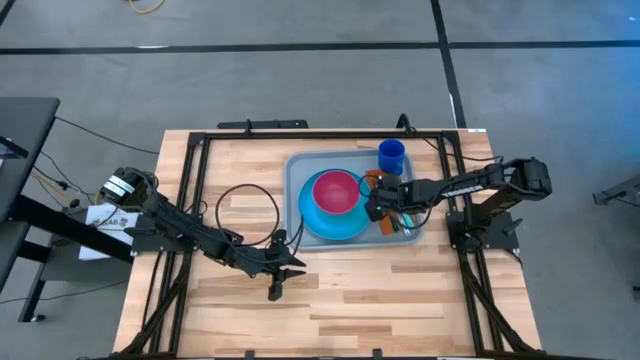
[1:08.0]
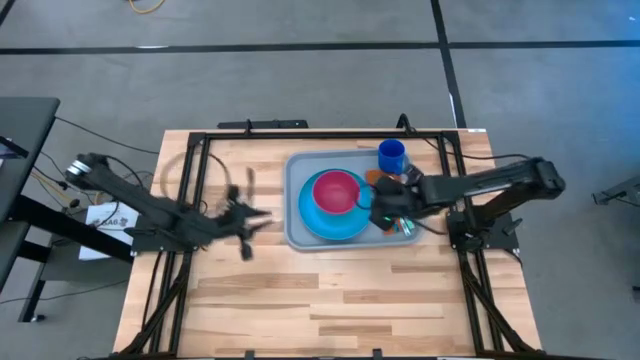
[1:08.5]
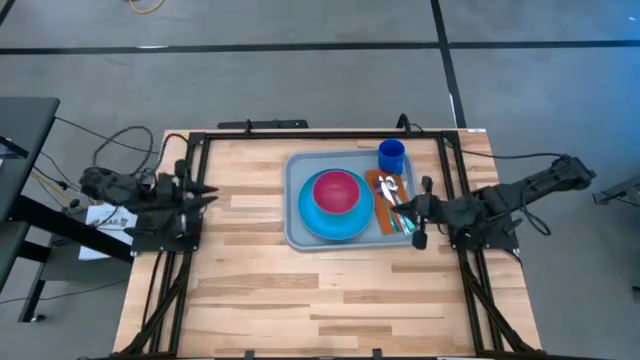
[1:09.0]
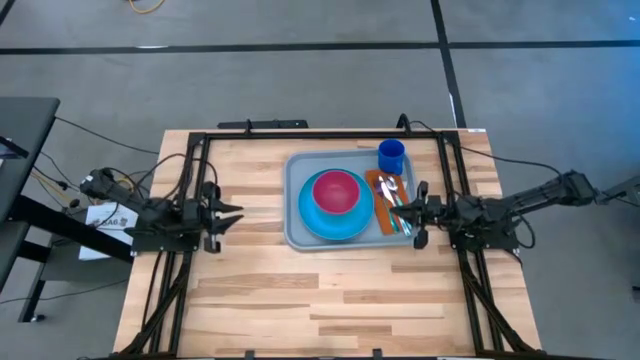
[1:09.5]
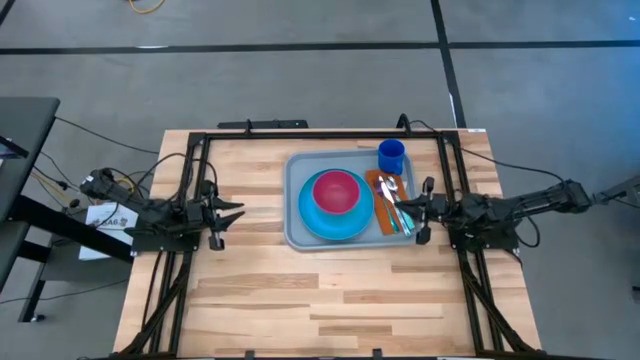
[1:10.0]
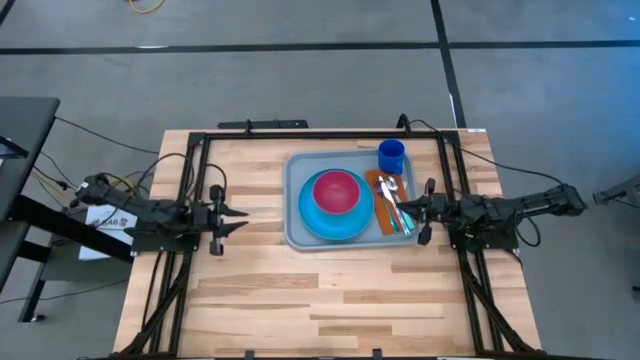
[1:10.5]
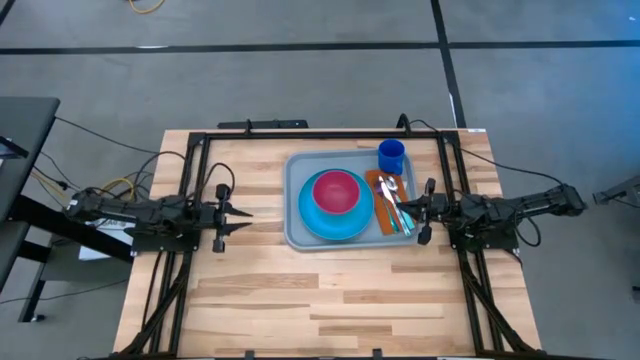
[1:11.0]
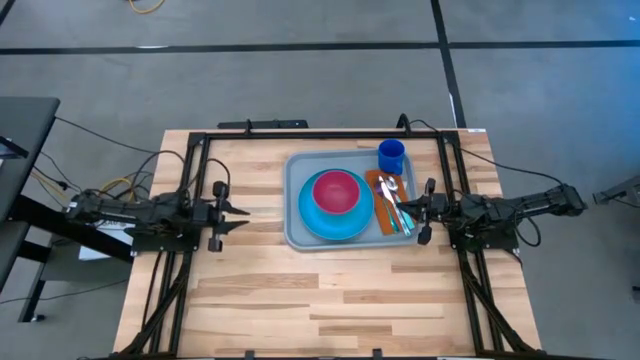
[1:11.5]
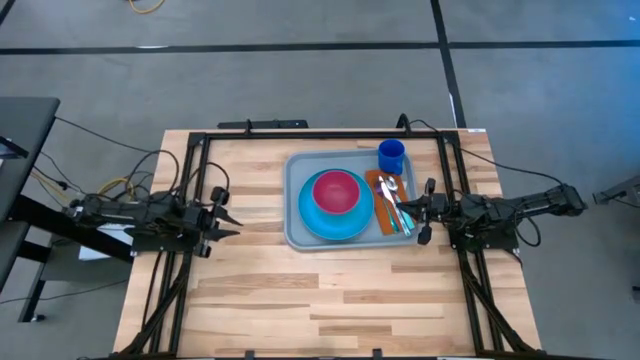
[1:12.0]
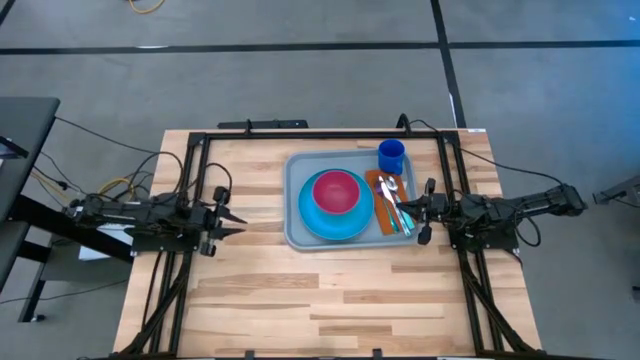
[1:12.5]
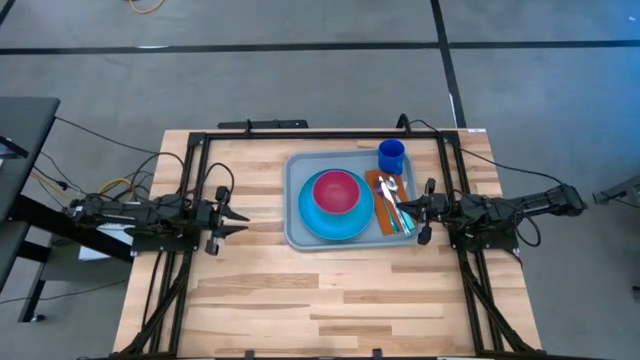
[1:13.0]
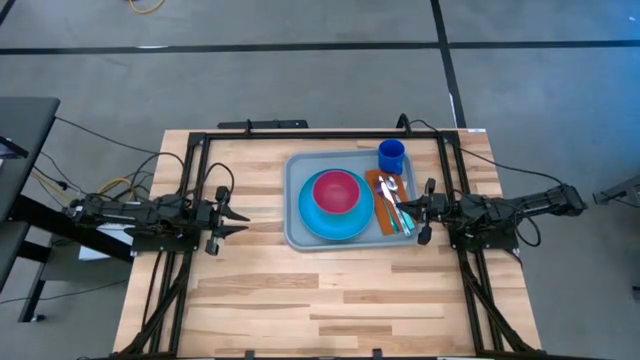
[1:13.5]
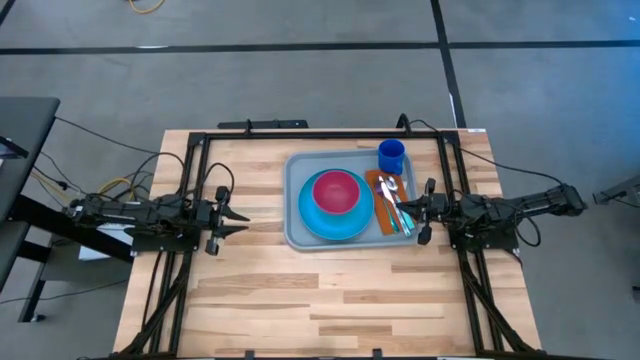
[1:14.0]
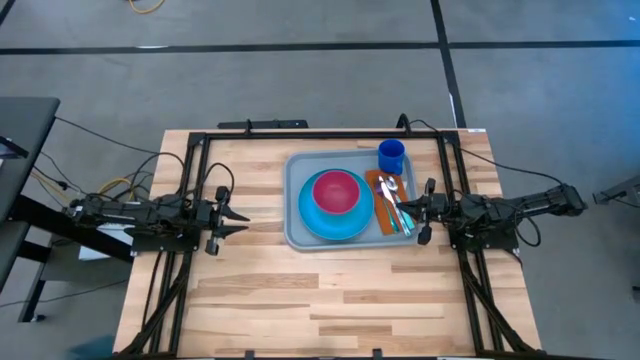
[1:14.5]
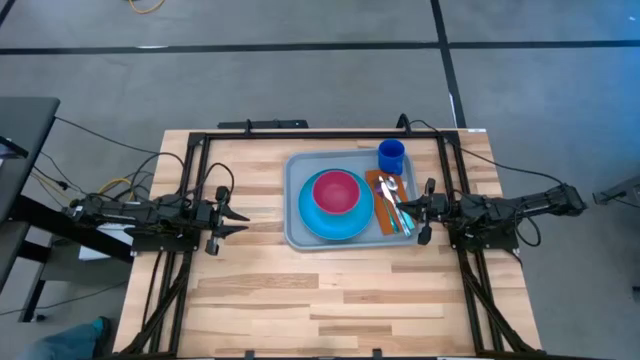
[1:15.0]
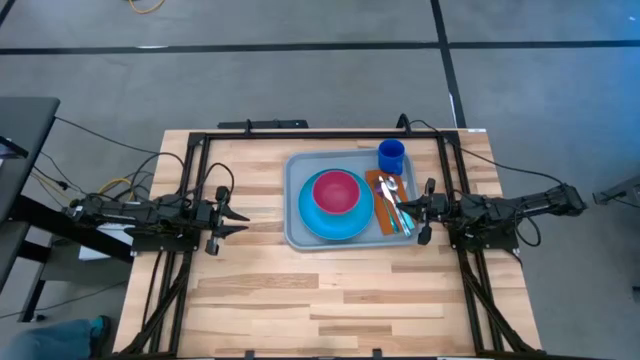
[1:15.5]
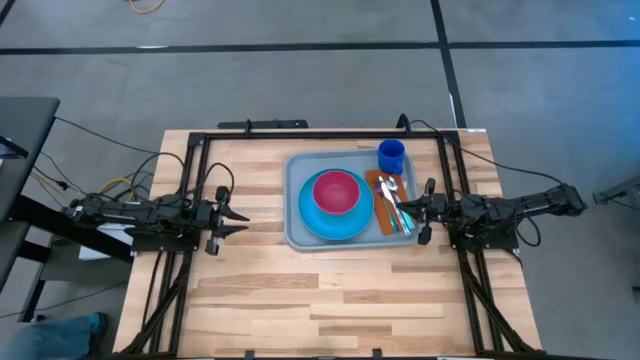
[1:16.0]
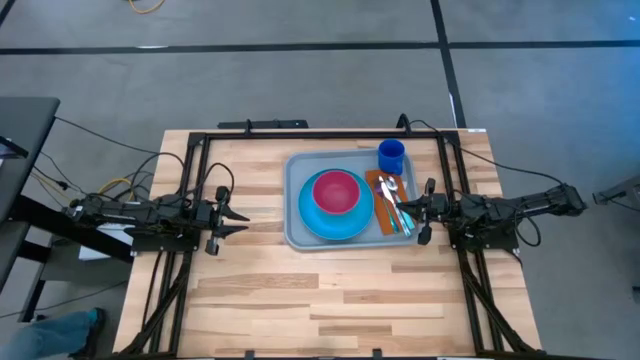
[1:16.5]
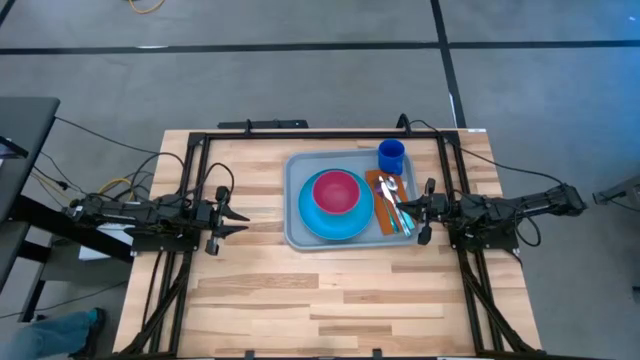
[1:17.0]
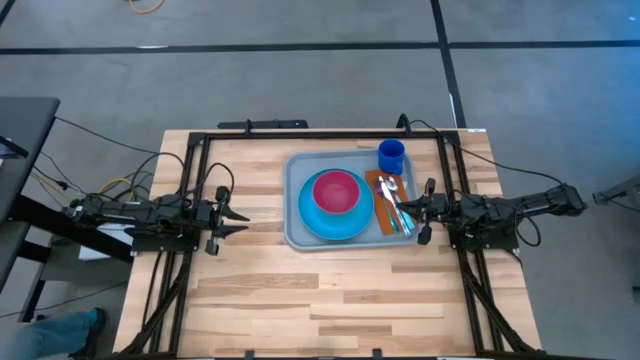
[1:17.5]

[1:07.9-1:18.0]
Task: Set up tray
Return to Home Position

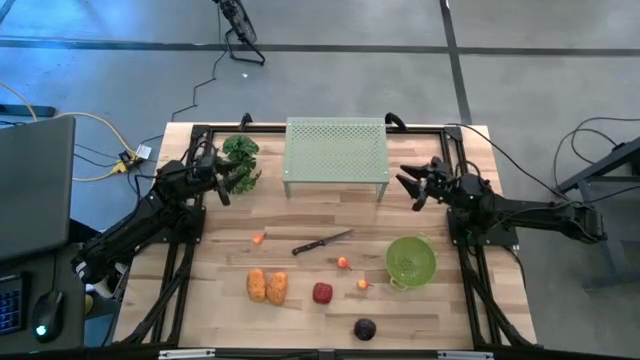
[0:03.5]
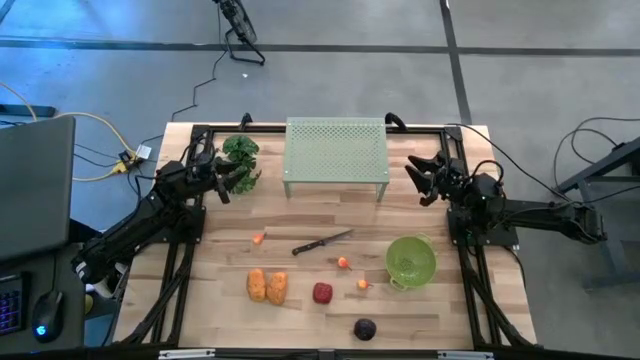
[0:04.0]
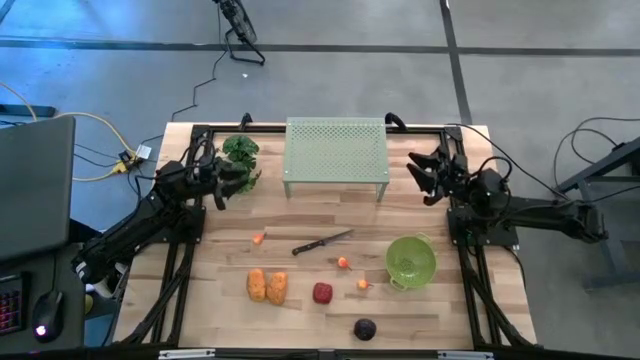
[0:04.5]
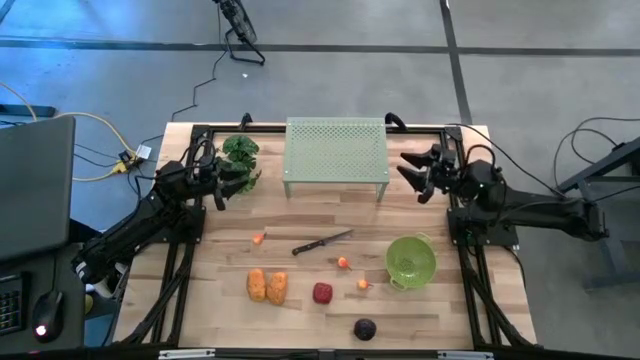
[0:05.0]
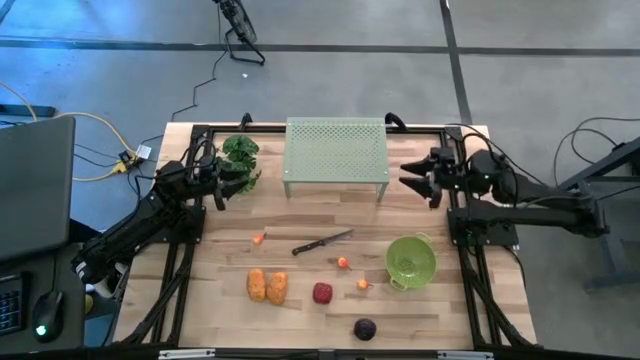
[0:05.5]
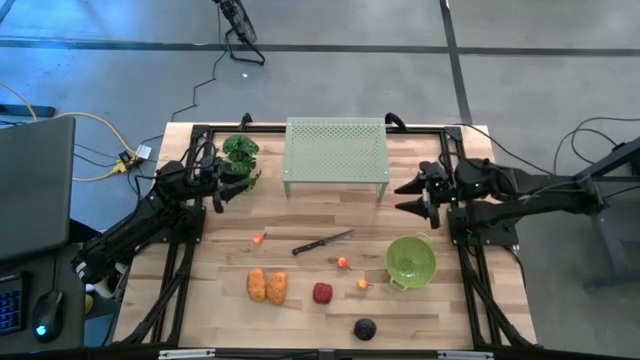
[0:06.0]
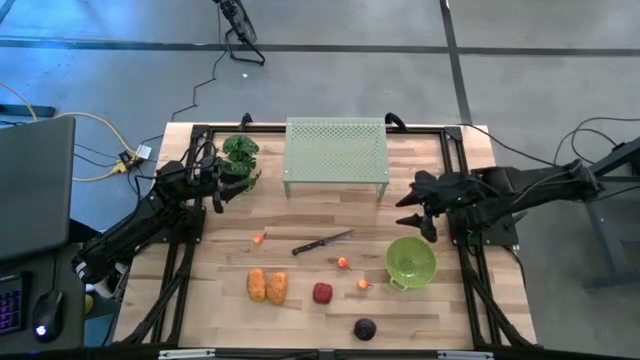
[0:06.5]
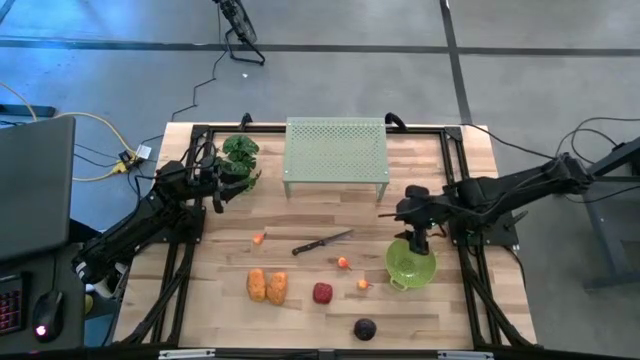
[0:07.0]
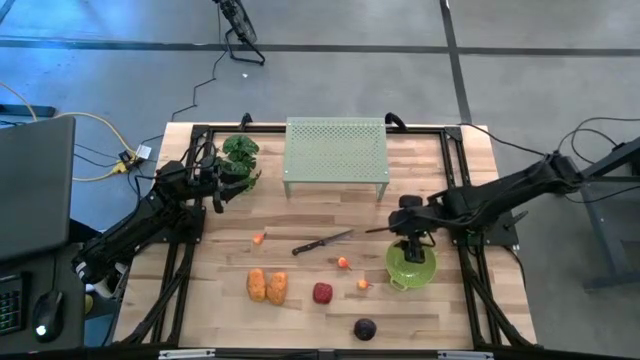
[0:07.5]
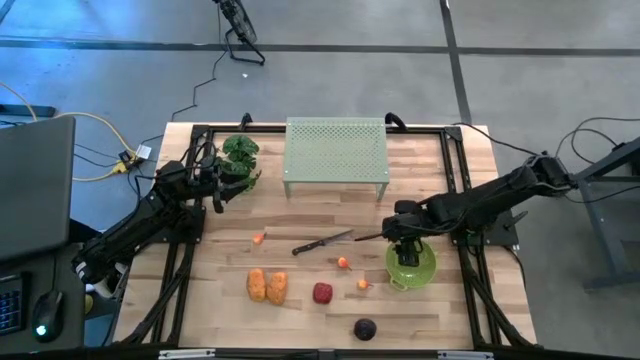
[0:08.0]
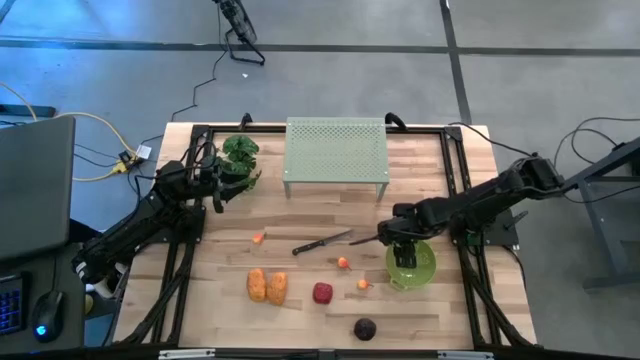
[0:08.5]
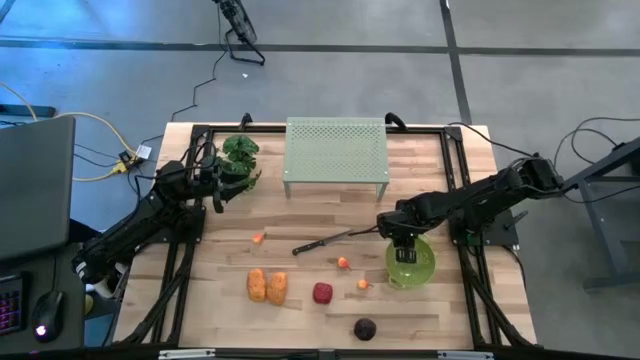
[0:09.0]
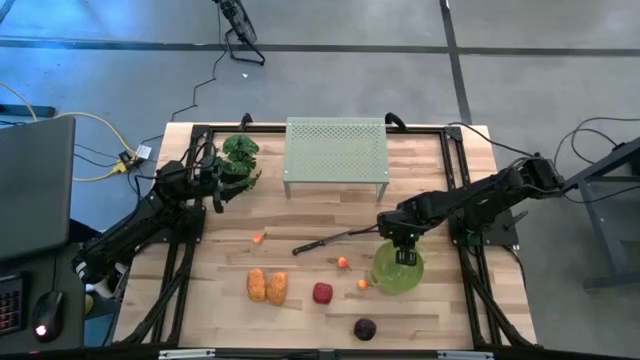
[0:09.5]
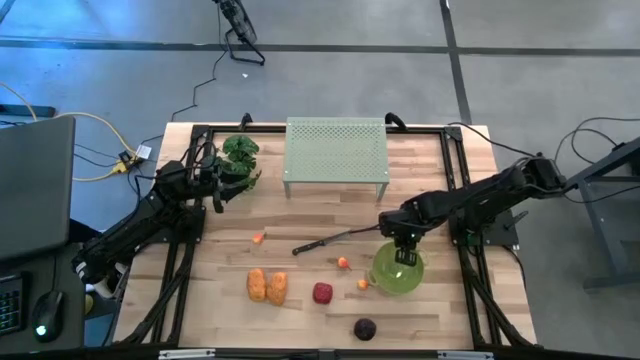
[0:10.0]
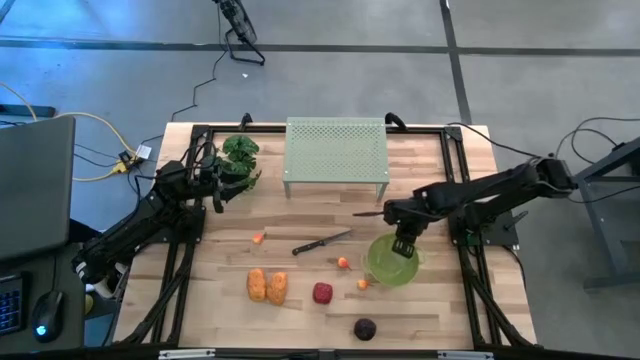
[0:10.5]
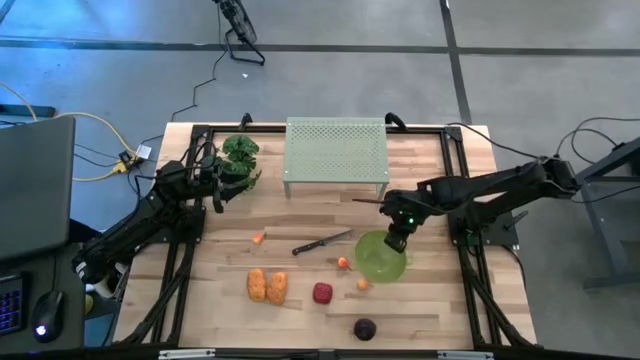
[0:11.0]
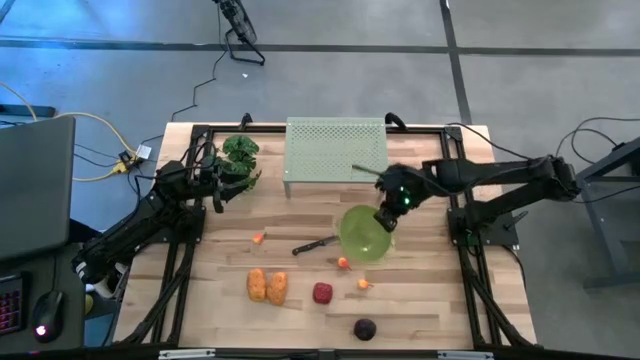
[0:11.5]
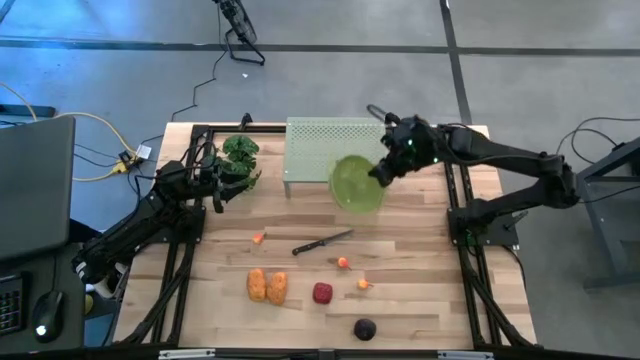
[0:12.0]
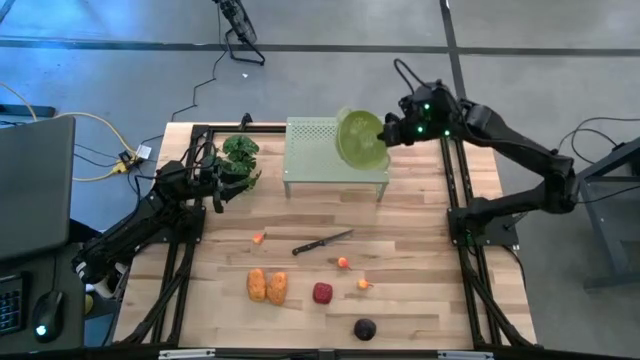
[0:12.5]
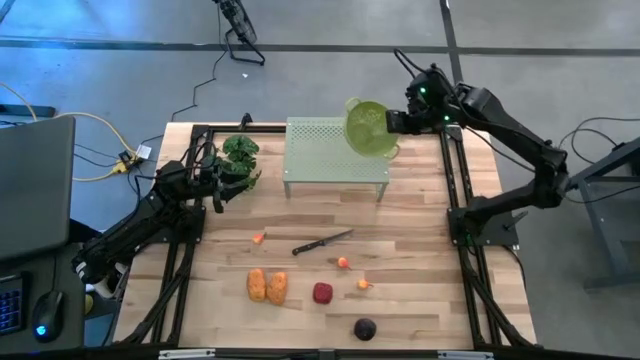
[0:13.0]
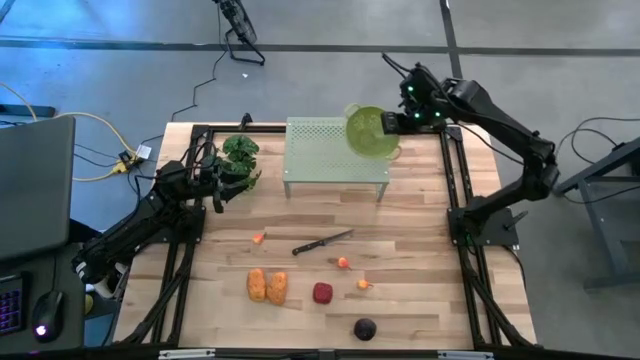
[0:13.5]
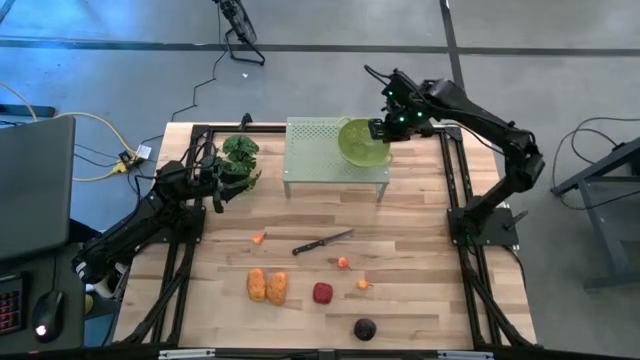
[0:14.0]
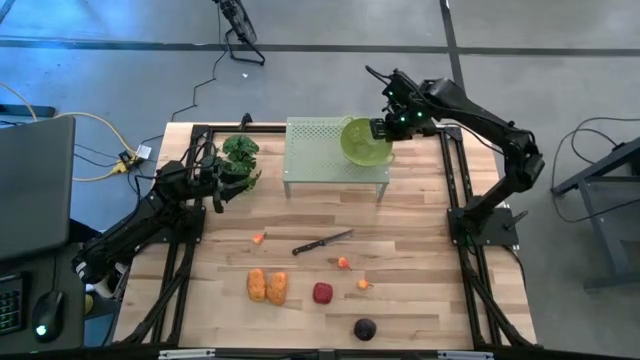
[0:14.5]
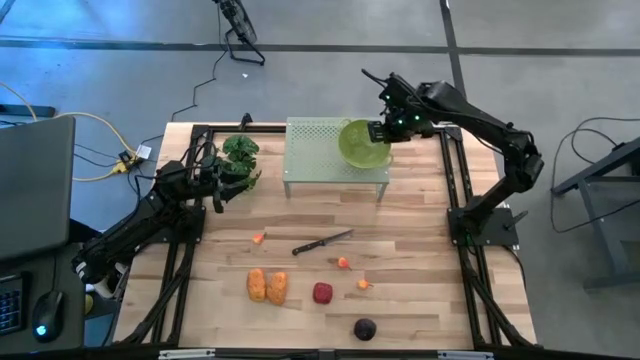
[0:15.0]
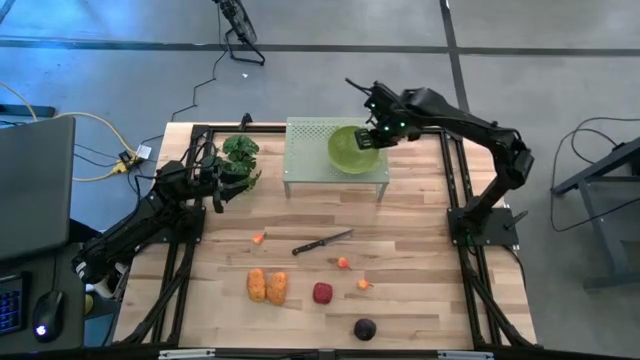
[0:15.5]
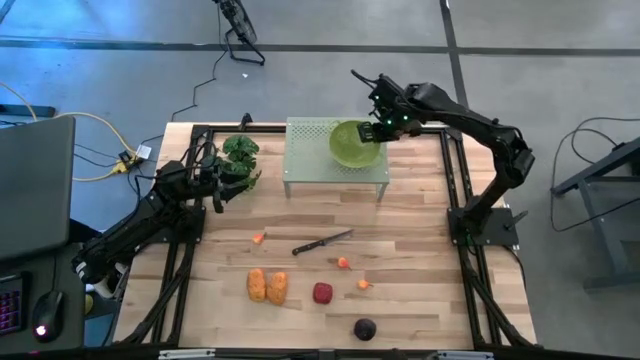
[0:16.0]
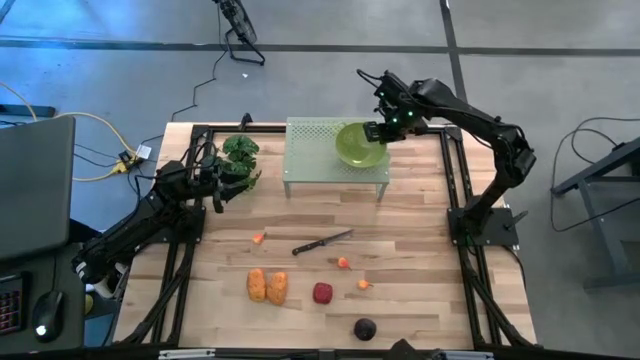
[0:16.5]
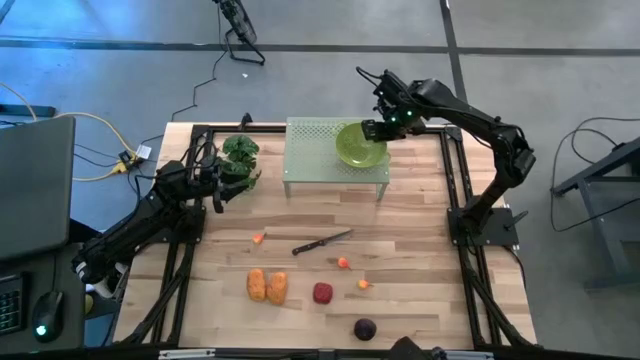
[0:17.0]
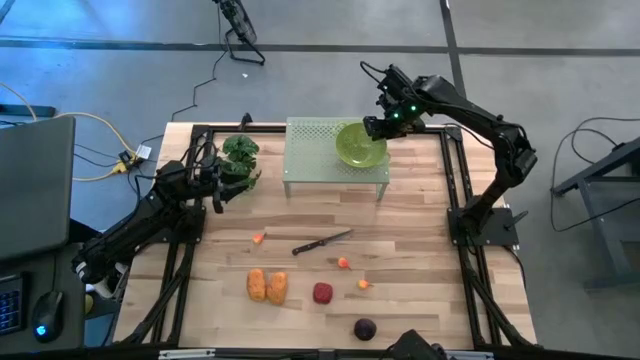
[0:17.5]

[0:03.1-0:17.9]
Task: Pick & Place Fruit
Put the green strainer bowl on the shelf
